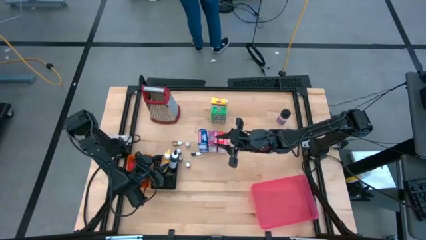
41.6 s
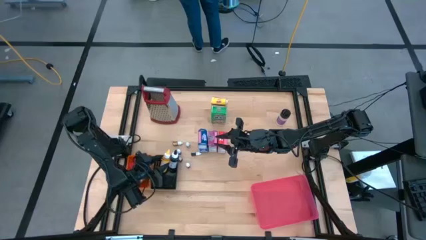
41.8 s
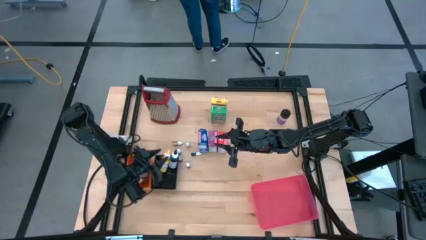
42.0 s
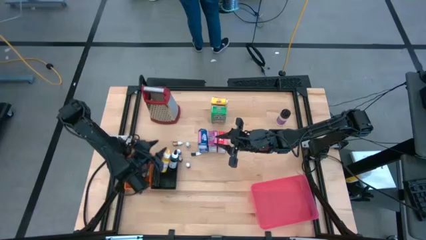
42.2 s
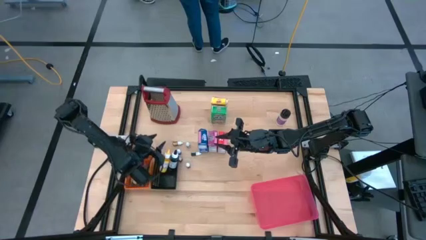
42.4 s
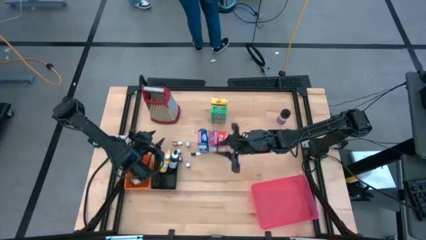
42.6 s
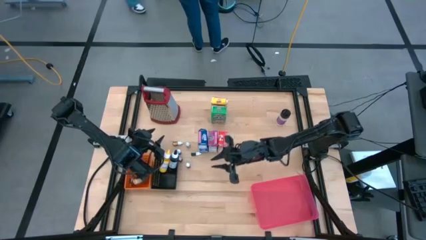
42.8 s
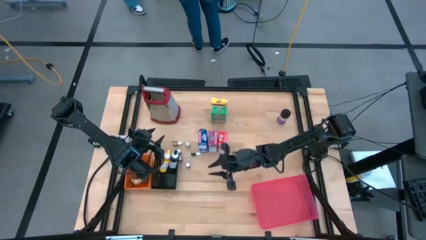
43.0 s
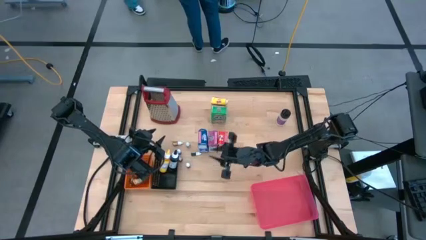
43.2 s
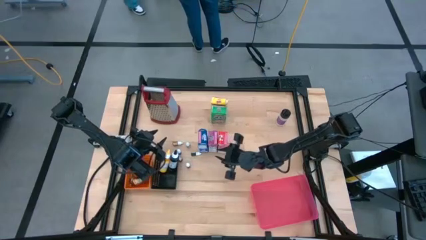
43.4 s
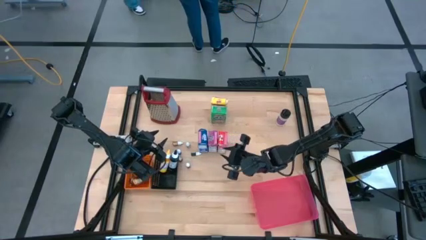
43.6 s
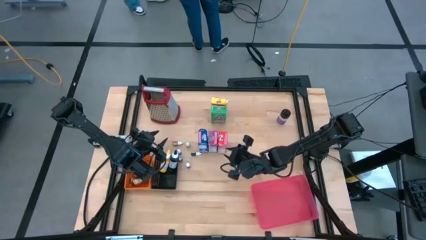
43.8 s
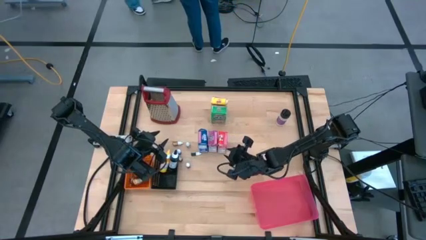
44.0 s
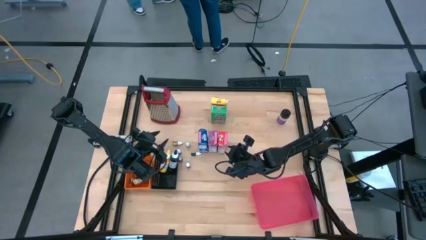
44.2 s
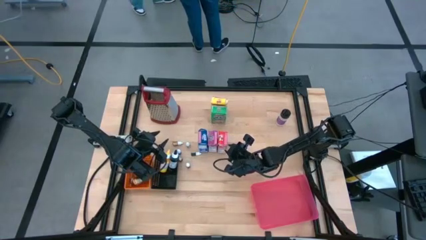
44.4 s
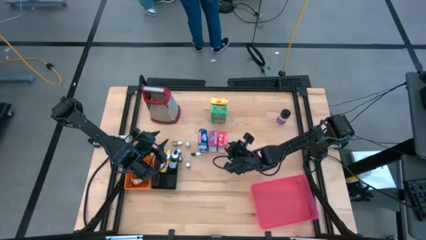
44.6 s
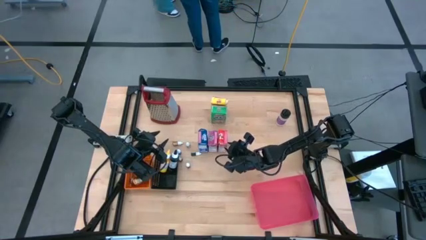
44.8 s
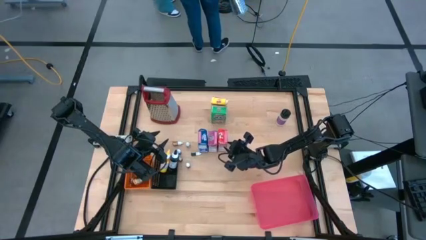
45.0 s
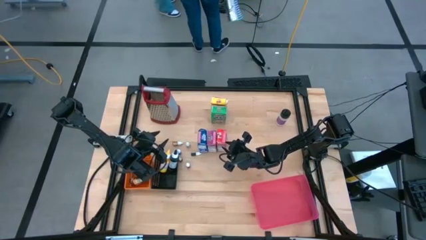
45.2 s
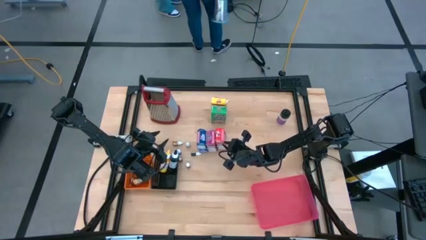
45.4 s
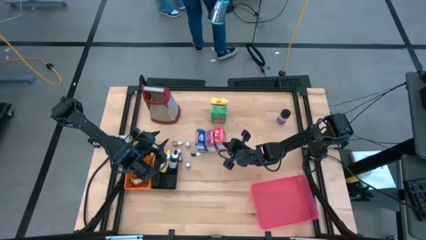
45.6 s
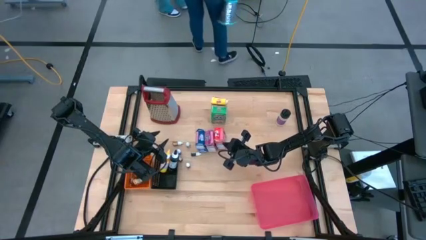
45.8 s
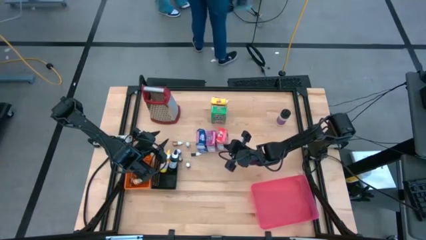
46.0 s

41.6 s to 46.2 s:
Task: Pick & Place Kitchen Items
Put the red cereal box into the red bin

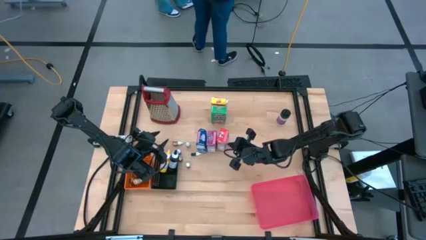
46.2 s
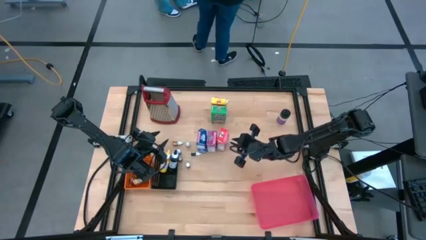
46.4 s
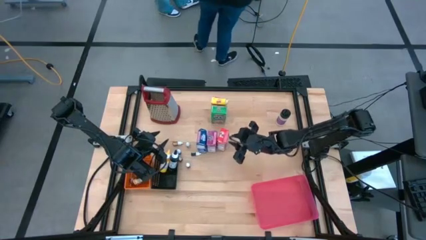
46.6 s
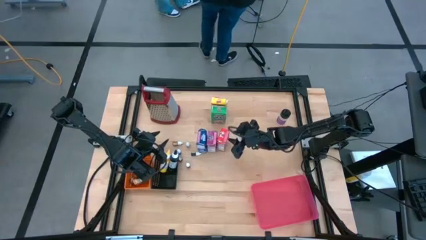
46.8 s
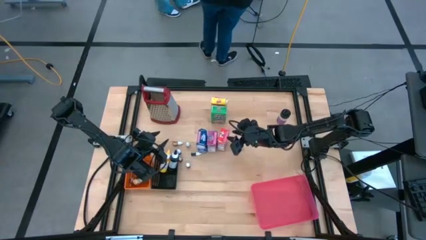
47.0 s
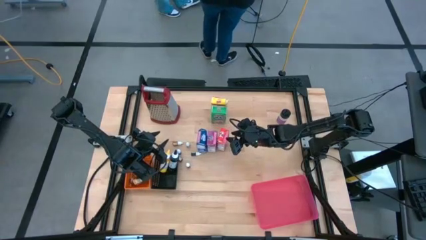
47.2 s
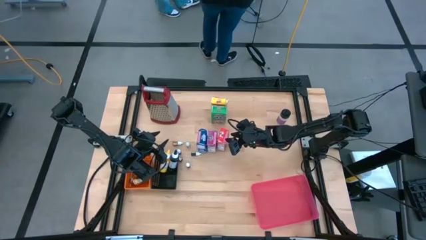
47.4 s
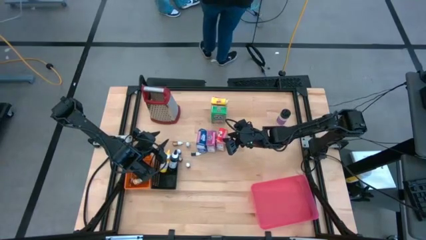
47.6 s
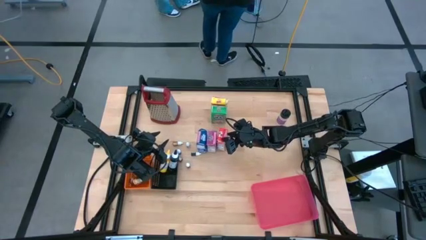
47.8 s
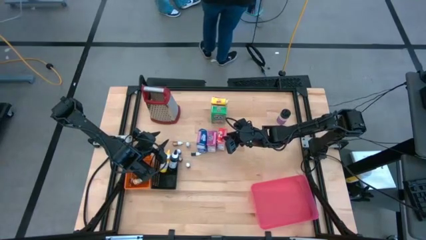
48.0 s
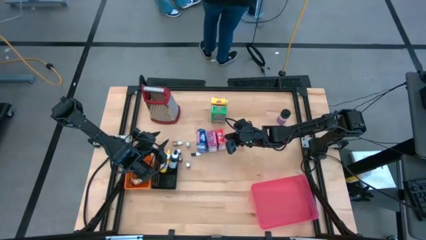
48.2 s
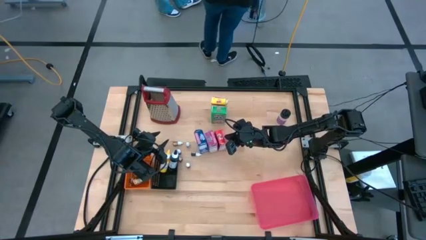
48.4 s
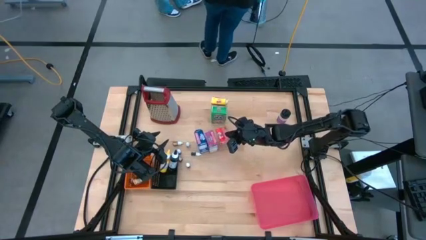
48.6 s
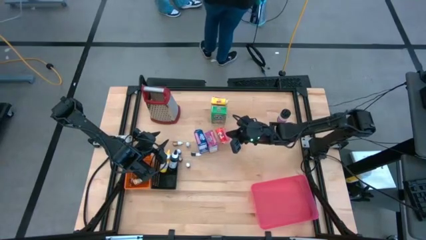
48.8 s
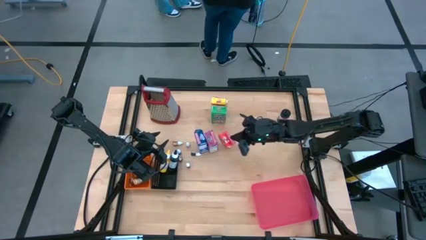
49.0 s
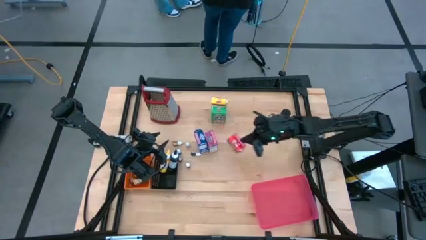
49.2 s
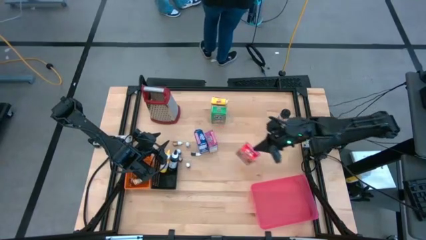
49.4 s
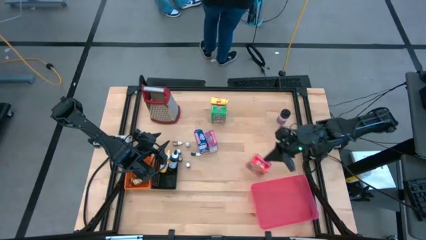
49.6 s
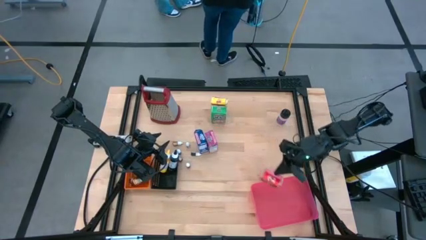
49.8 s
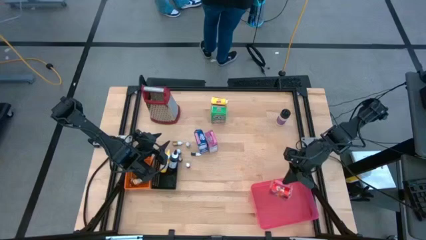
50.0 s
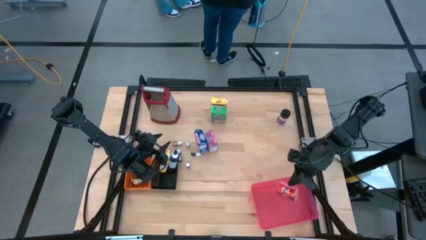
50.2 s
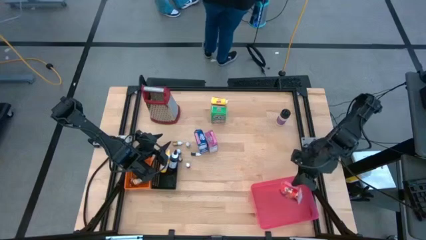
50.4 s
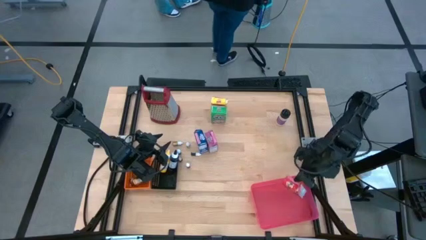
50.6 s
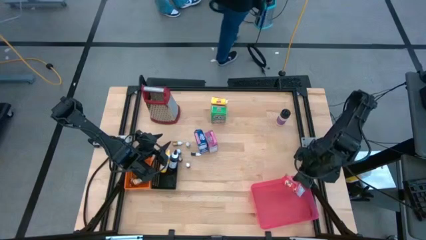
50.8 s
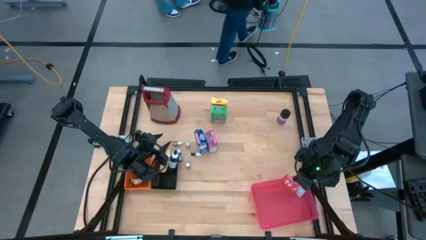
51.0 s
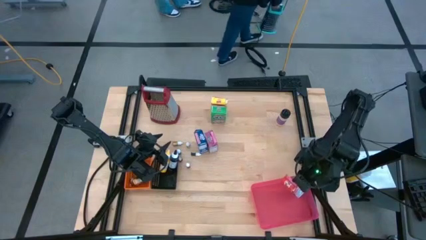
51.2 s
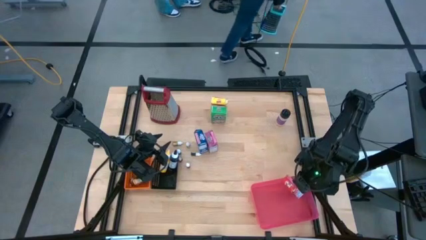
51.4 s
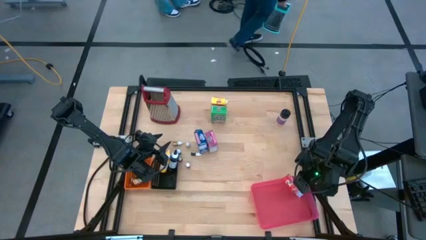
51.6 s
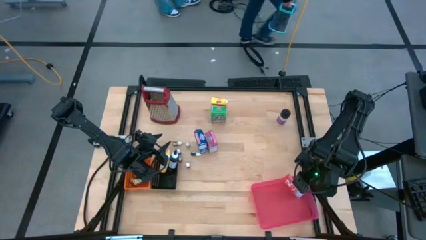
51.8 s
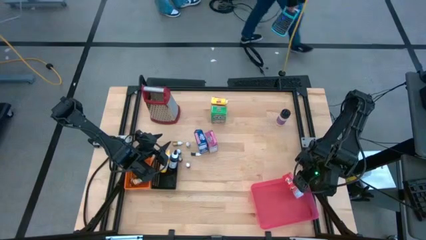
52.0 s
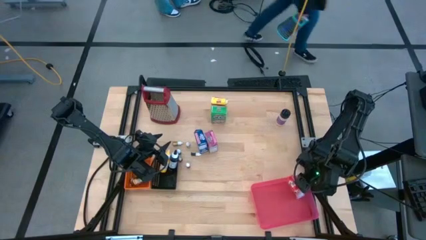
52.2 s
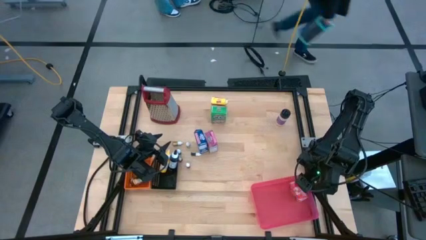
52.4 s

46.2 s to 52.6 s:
Put the red cereal box into the red bin
